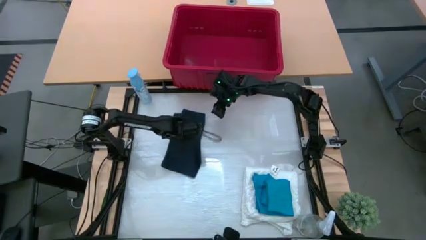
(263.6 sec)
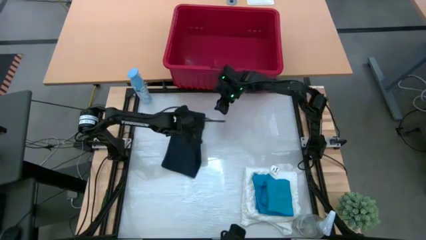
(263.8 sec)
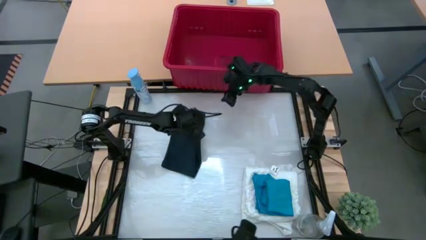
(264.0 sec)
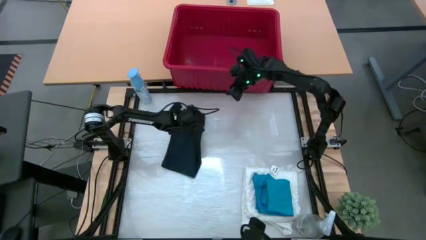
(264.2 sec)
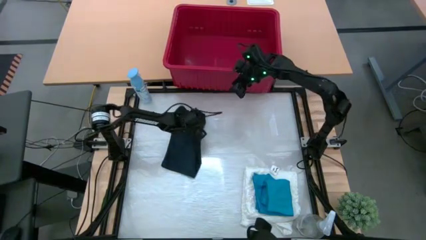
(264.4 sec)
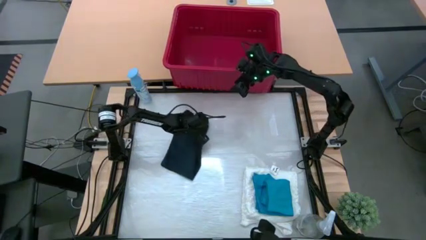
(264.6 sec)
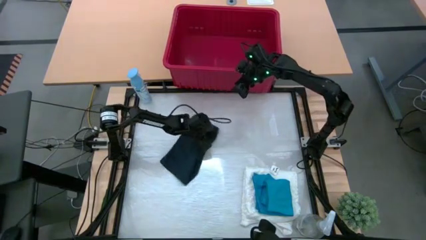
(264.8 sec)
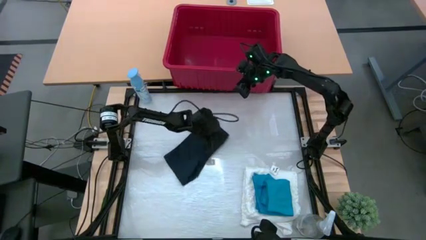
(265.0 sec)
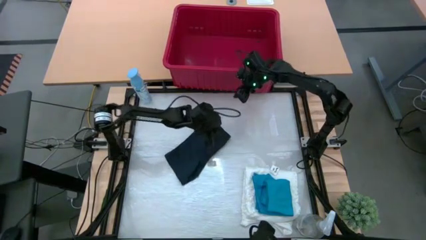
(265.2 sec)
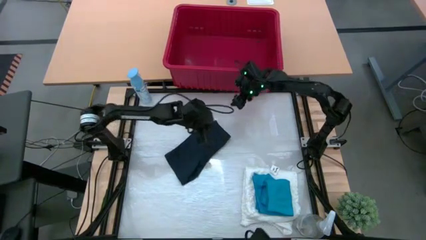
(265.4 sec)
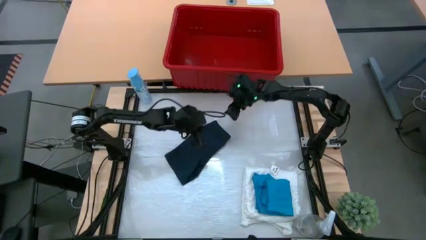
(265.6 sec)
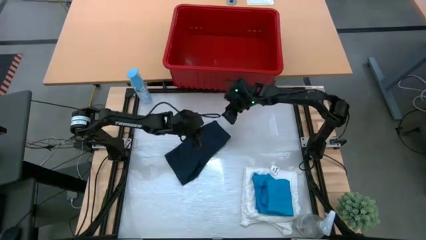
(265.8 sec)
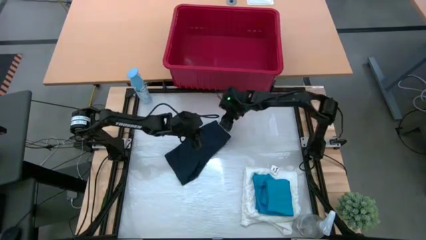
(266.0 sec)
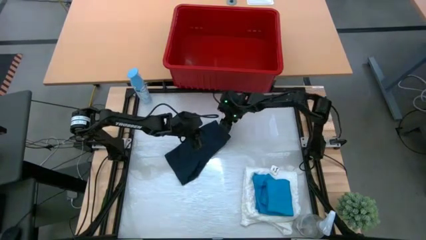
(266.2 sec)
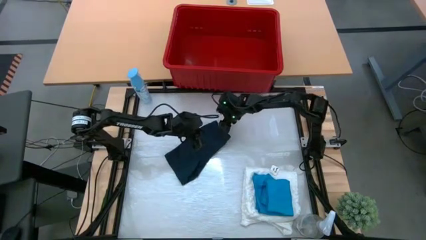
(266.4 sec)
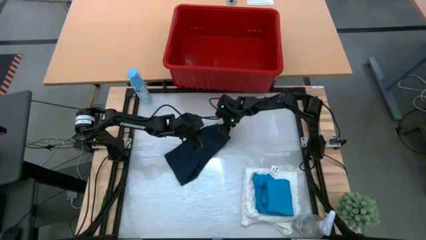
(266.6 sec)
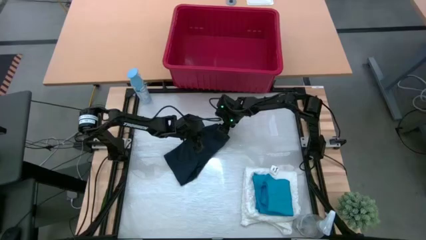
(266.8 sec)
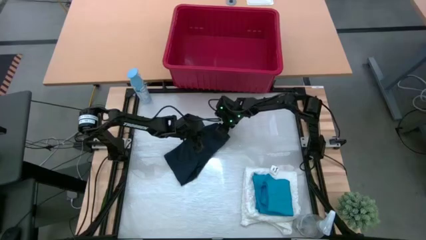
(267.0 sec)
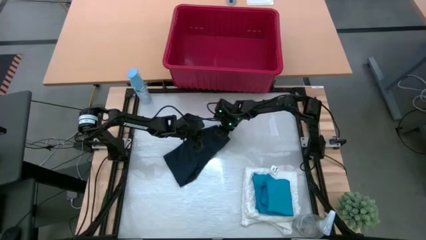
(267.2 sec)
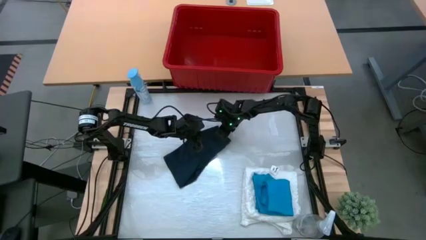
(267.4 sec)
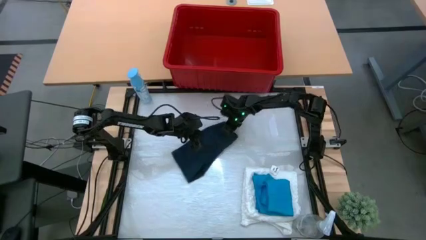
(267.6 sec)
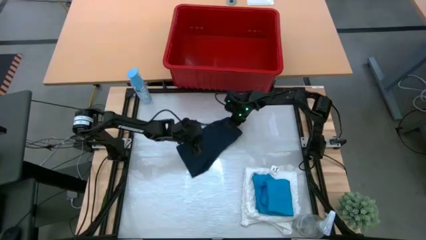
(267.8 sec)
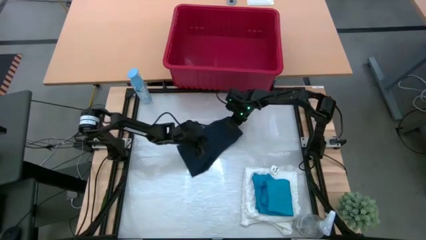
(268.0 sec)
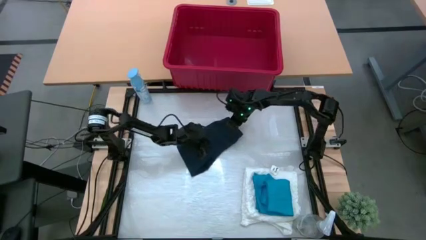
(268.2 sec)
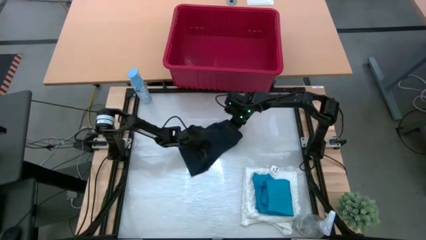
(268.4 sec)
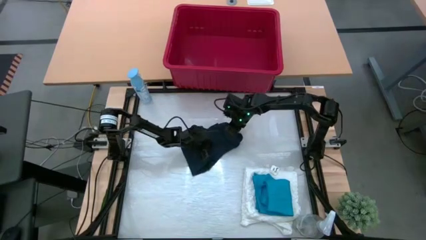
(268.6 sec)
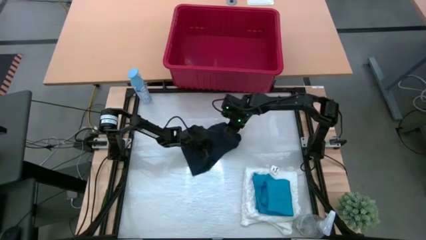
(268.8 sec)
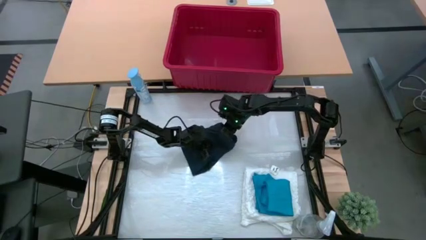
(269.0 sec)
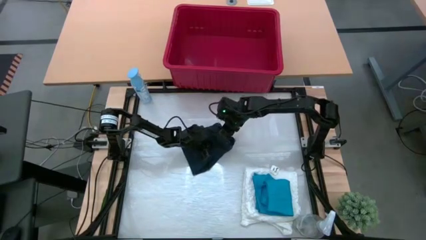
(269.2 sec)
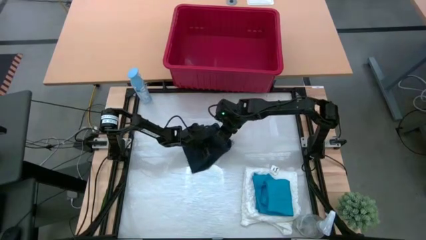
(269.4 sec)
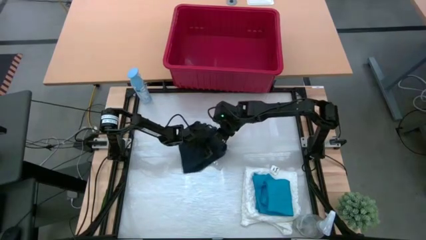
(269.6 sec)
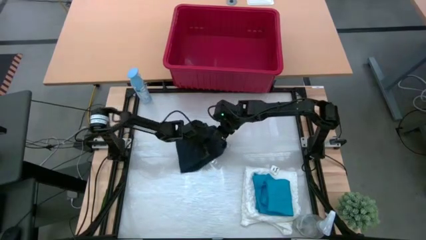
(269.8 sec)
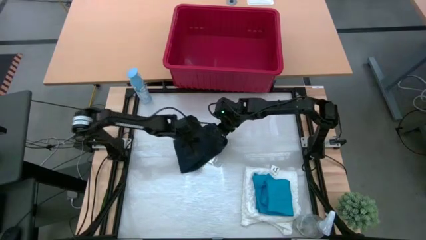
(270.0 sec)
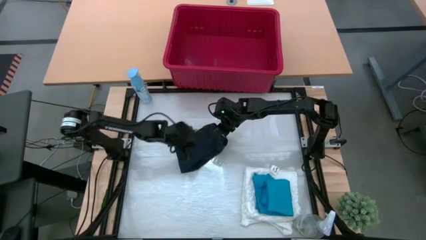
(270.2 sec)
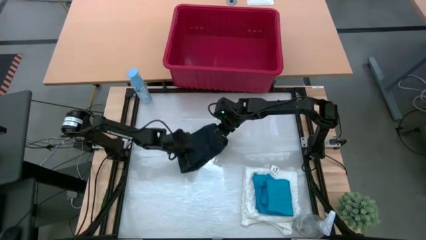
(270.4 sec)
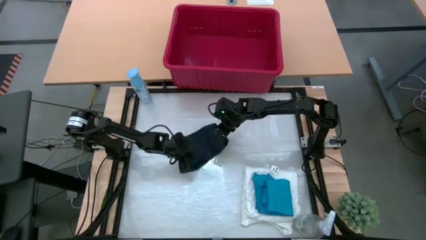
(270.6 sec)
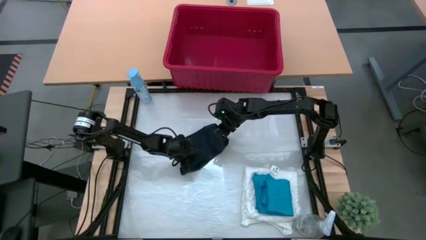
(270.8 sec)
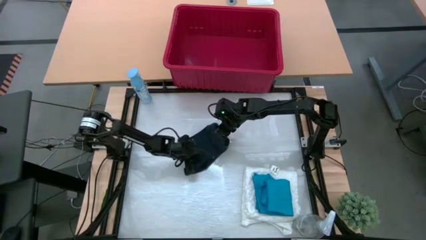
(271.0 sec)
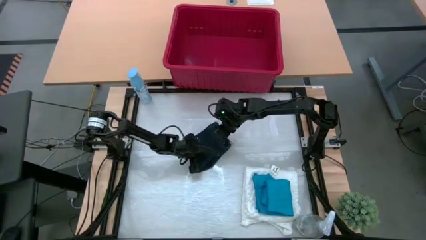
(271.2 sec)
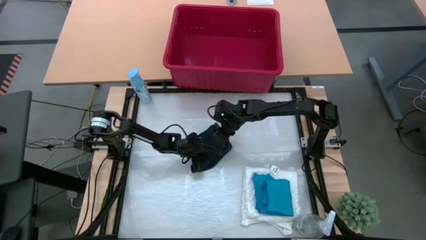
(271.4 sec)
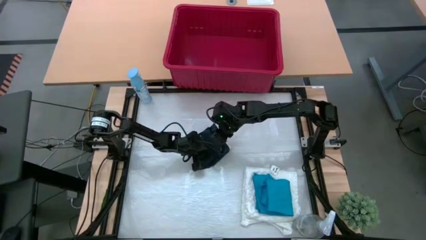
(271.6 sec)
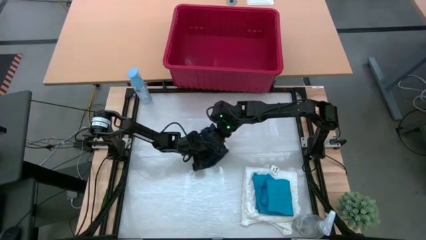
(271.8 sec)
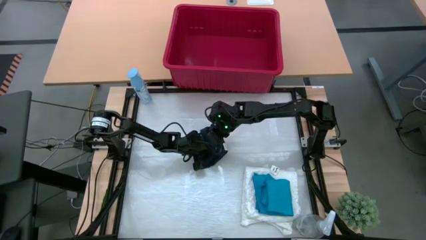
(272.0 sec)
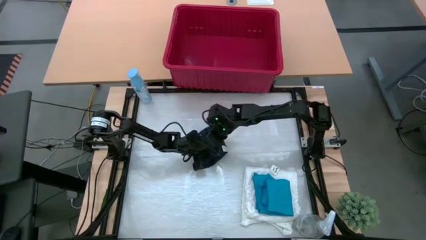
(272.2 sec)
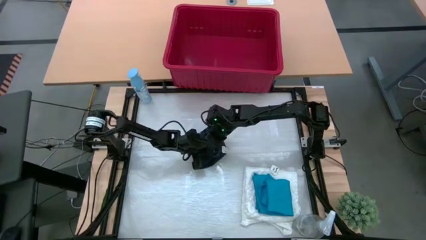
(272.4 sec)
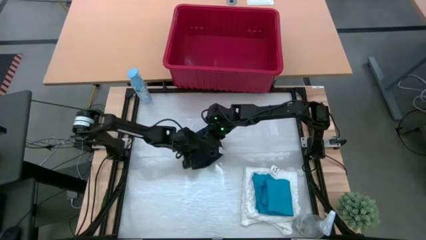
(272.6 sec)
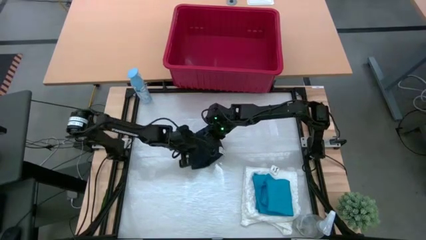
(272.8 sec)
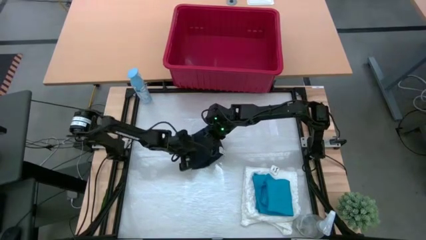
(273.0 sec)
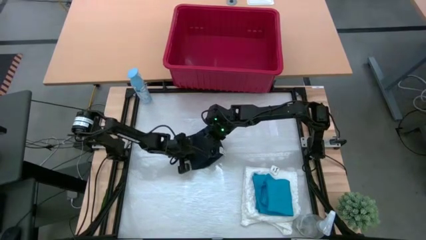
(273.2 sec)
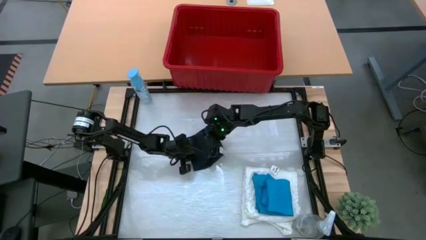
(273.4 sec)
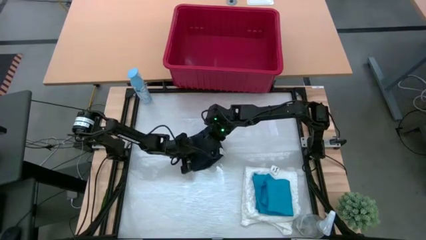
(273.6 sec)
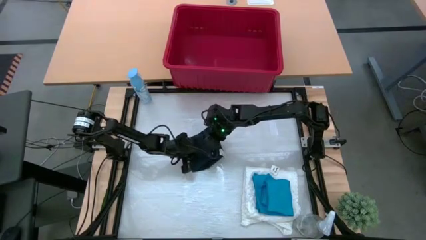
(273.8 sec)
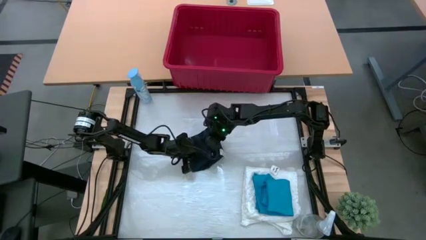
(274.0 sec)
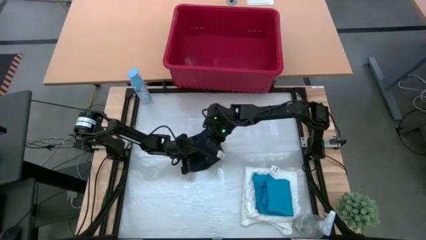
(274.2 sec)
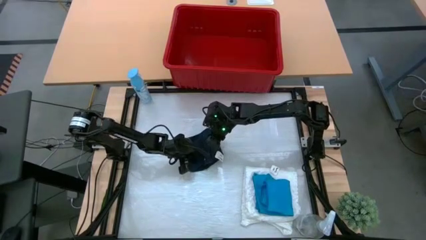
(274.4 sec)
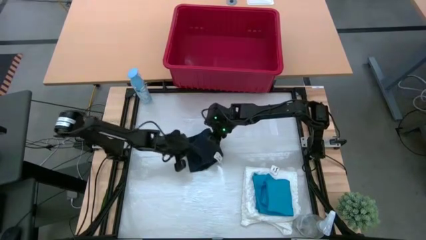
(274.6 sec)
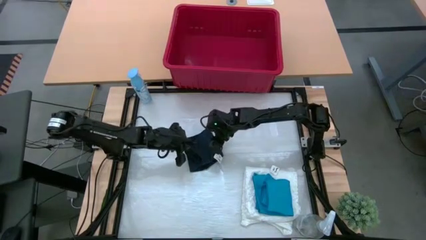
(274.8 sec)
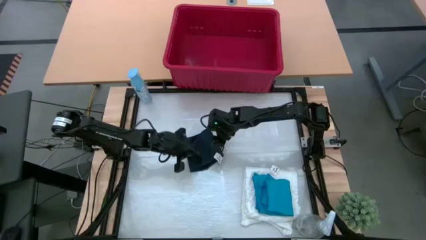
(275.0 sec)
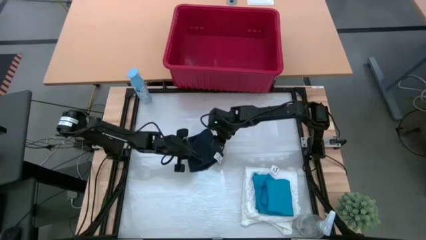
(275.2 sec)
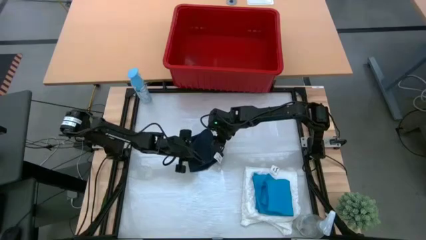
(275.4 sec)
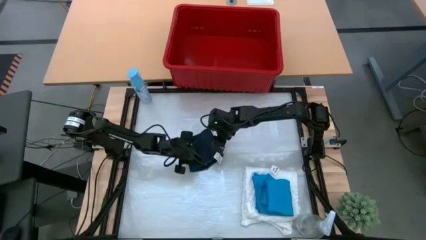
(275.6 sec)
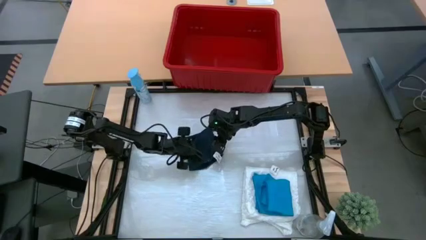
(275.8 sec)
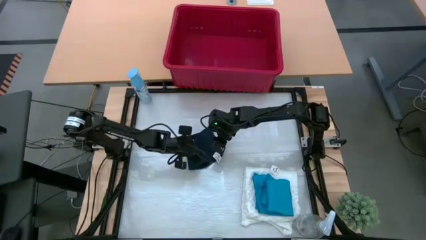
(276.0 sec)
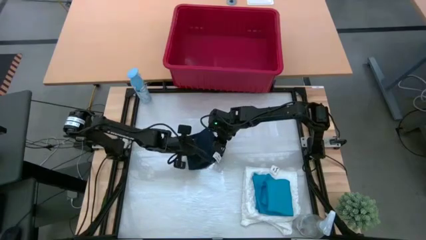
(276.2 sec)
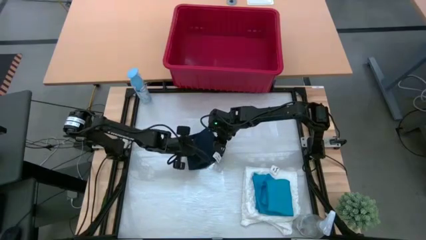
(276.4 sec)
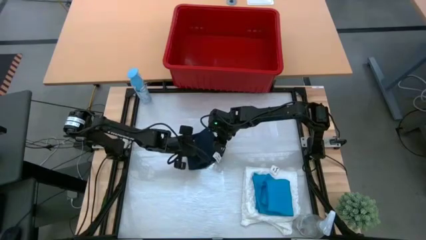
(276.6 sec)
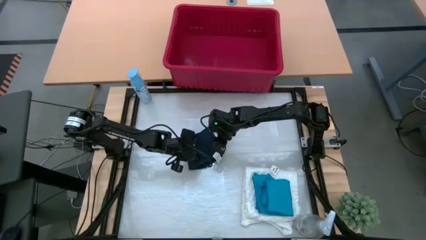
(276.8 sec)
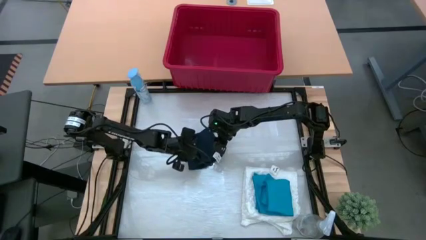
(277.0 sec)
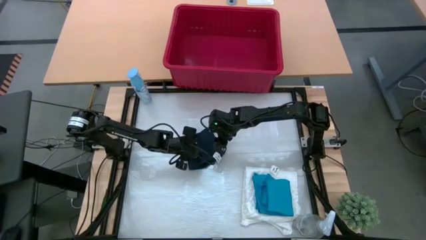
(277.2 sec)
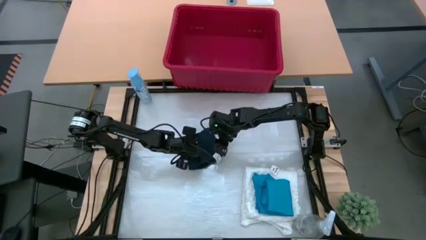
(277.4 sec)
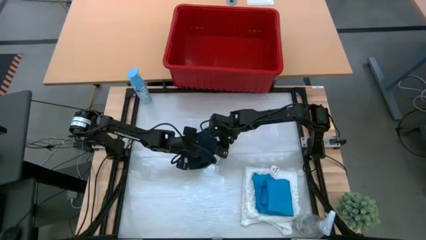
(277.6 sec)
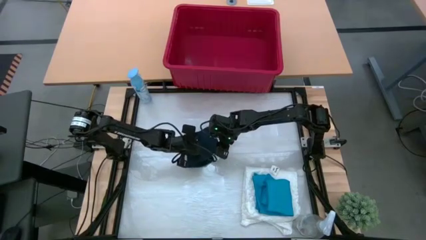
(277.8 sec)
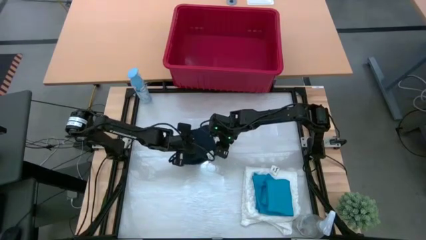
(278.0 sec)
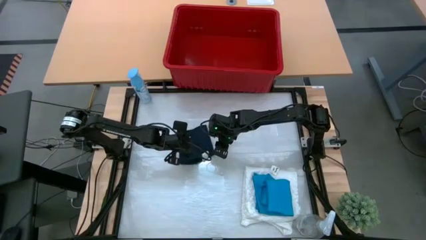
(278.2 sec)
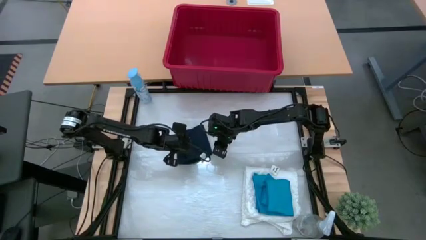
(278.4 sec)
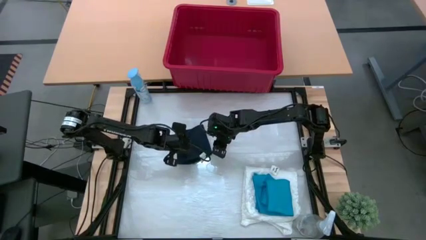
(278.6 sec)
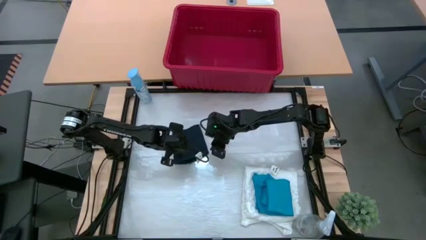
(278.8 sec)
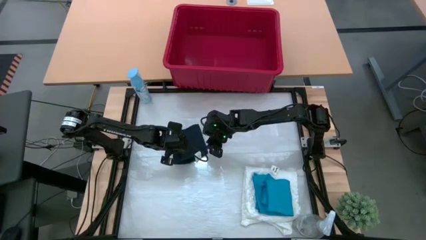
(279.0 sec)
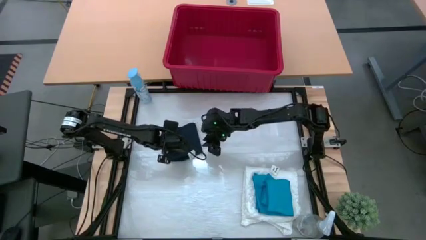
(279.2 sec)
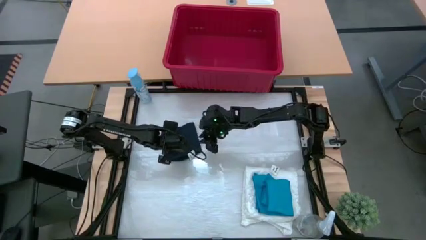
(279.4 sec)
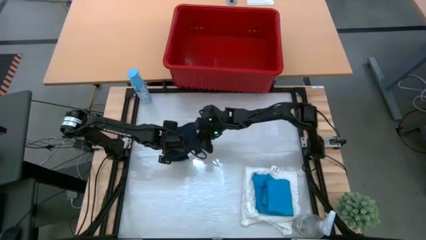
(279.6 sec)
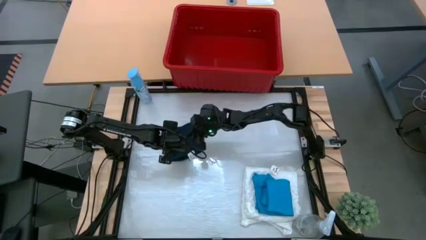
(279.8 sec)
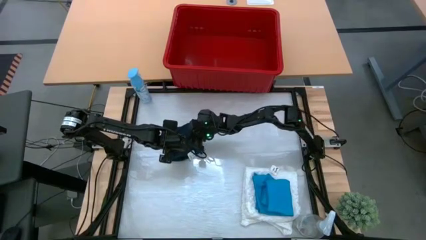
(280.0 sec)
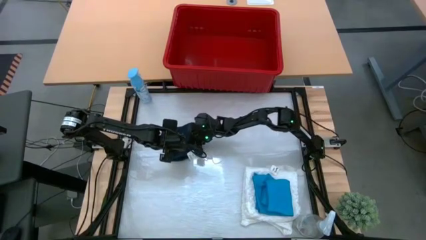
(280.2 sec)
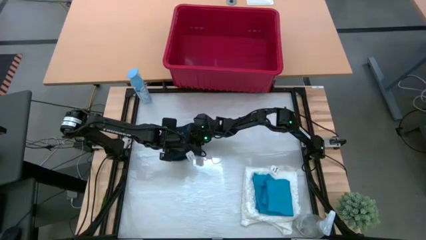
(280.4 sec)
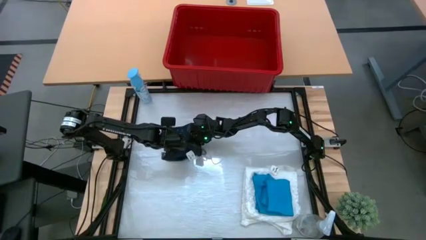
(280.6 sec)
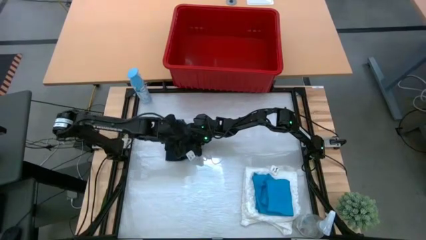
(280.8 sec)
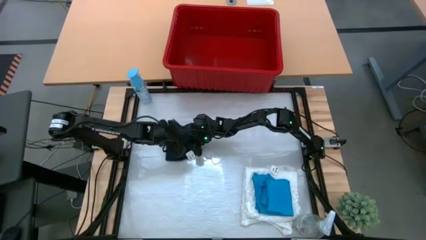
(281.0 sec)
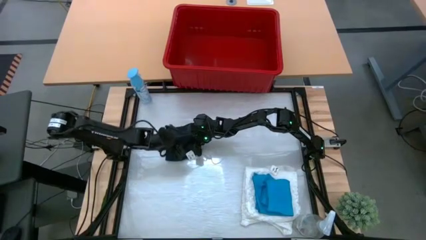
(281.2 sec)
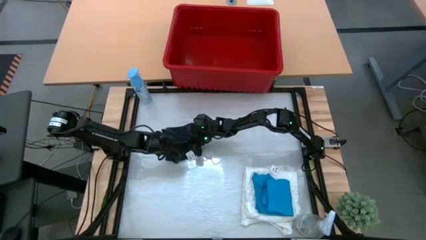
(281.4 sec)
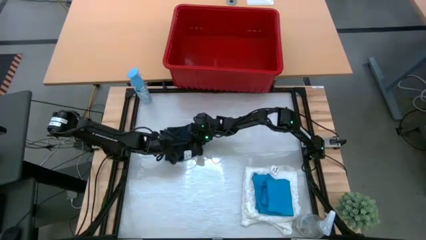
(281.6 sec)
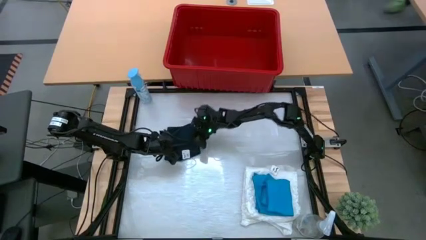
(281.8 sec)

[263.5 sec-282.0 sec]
Task: Fold laundry
Fold the dark blue shorts
